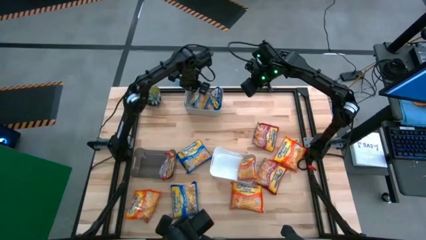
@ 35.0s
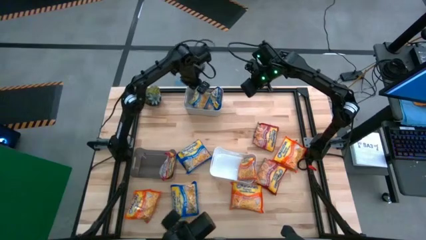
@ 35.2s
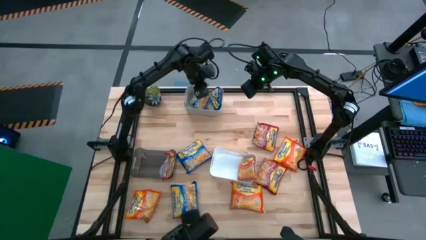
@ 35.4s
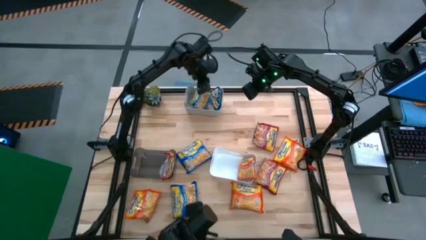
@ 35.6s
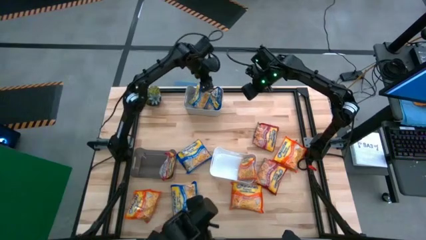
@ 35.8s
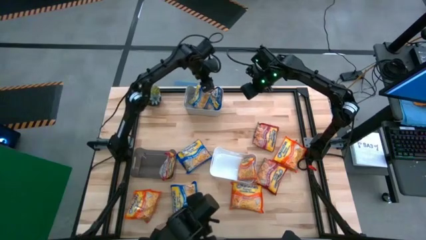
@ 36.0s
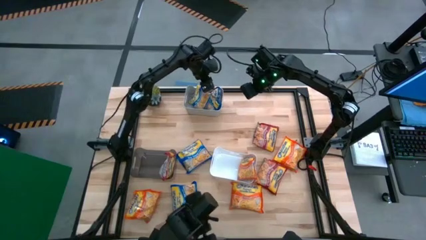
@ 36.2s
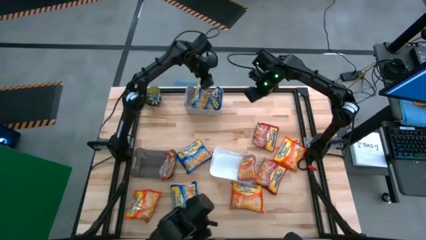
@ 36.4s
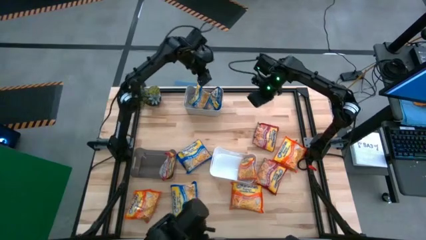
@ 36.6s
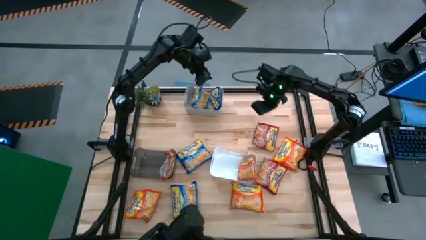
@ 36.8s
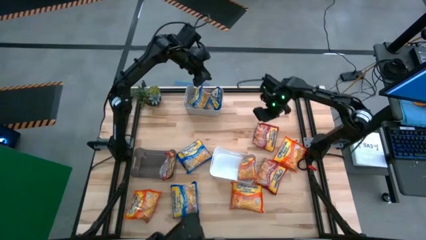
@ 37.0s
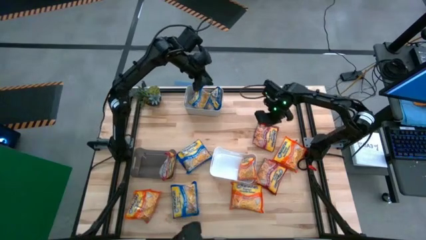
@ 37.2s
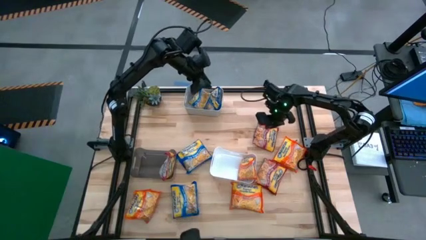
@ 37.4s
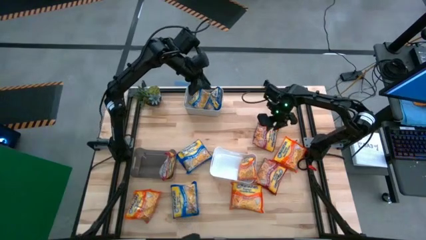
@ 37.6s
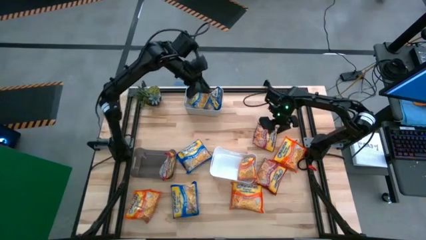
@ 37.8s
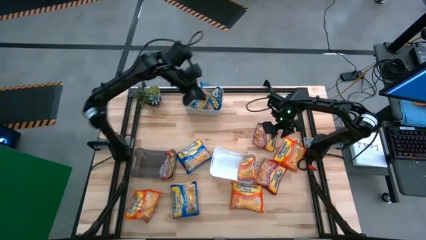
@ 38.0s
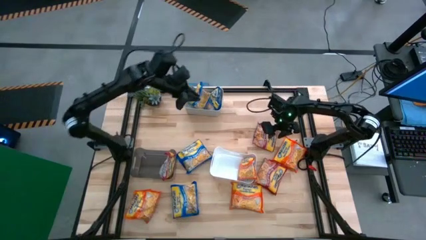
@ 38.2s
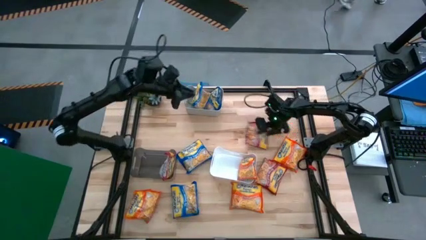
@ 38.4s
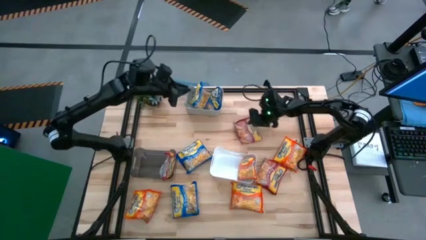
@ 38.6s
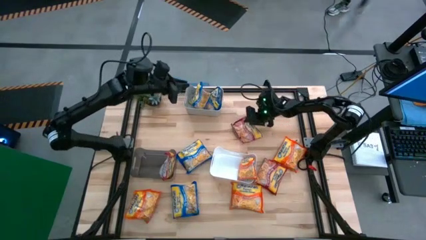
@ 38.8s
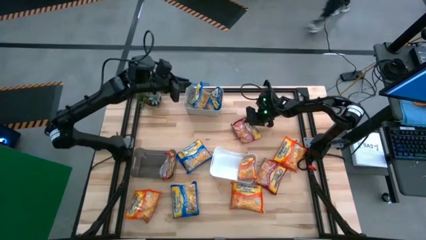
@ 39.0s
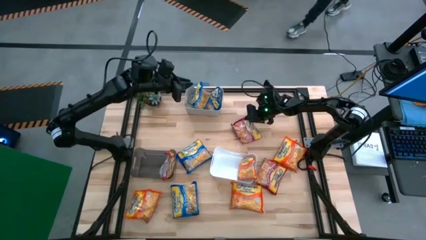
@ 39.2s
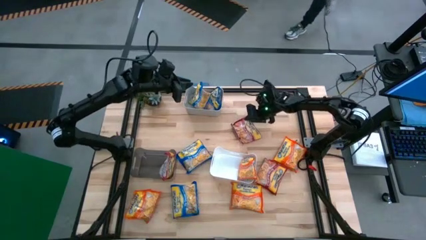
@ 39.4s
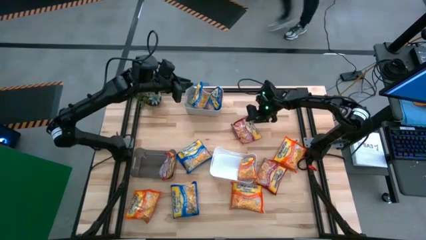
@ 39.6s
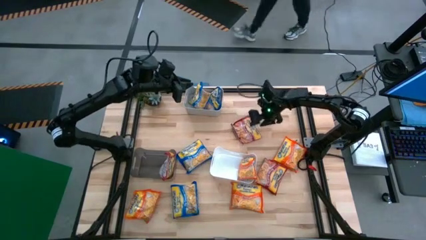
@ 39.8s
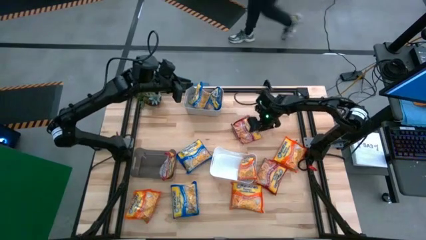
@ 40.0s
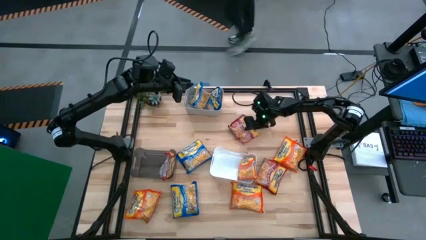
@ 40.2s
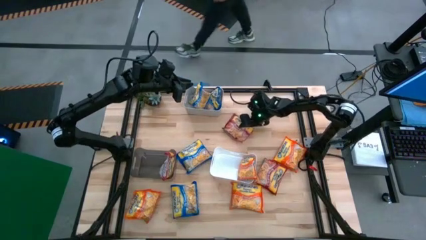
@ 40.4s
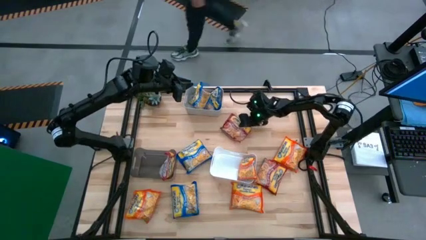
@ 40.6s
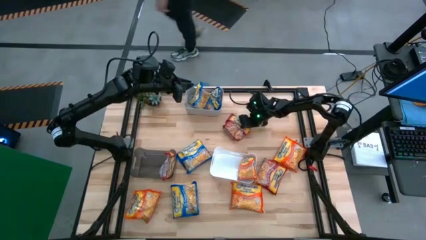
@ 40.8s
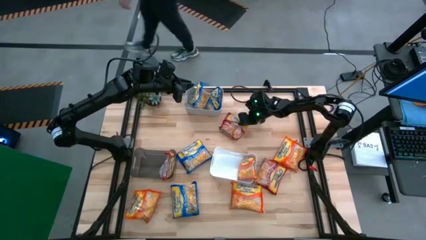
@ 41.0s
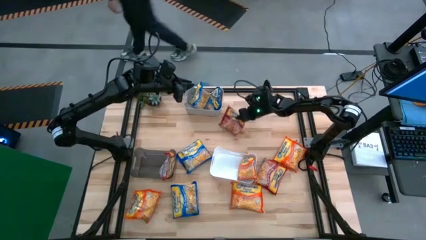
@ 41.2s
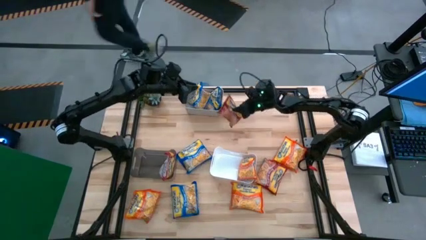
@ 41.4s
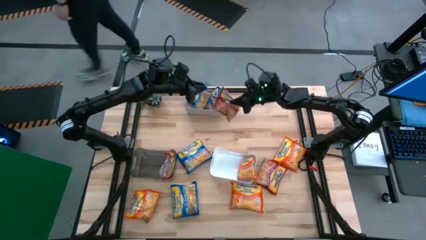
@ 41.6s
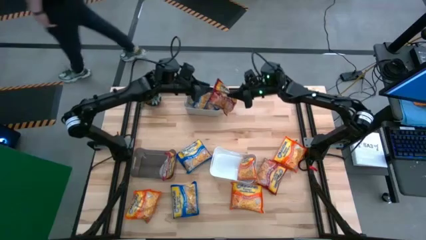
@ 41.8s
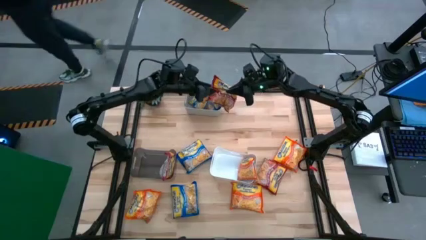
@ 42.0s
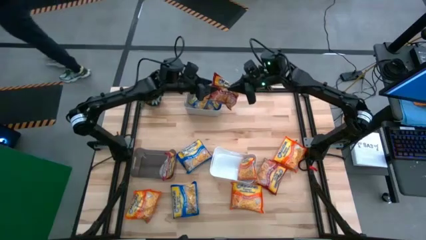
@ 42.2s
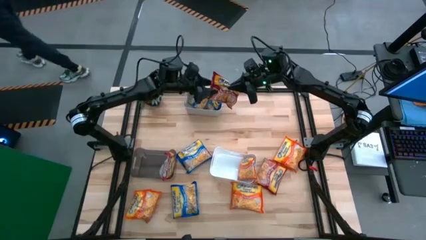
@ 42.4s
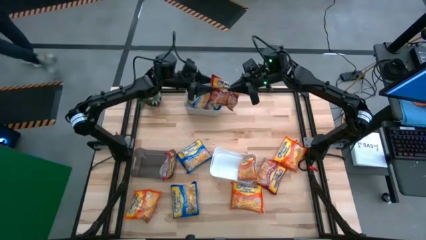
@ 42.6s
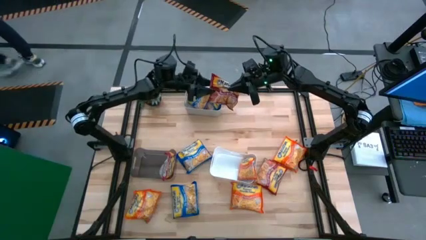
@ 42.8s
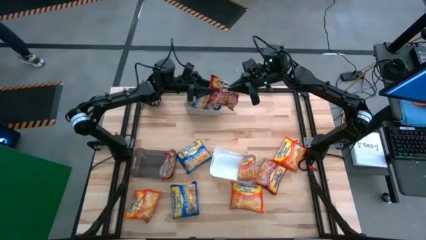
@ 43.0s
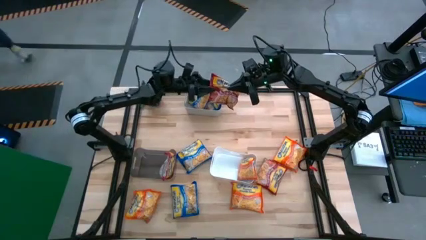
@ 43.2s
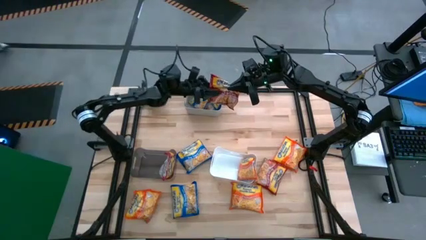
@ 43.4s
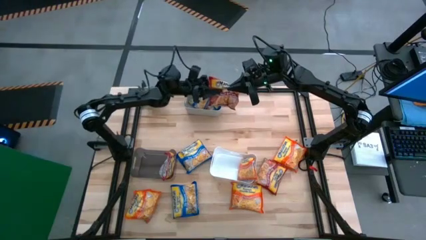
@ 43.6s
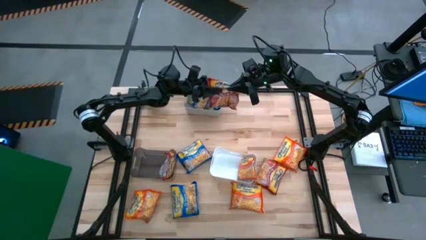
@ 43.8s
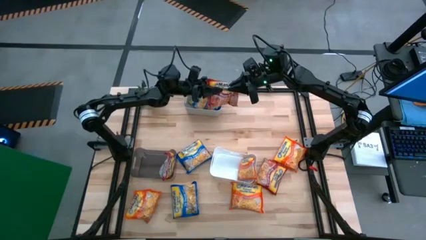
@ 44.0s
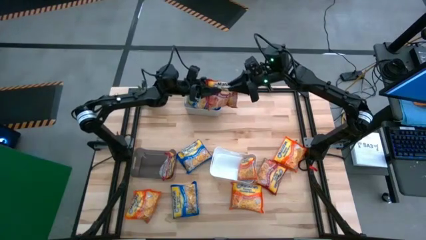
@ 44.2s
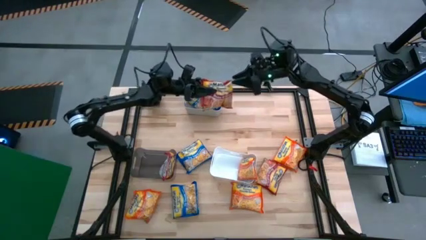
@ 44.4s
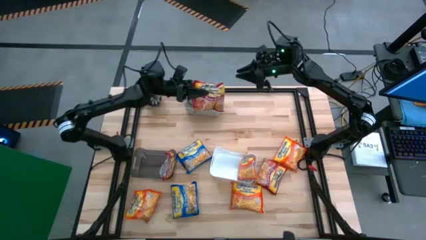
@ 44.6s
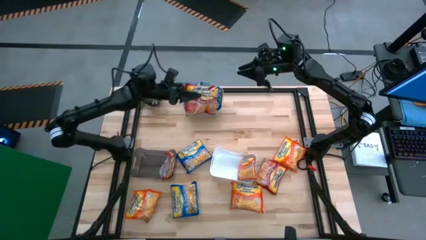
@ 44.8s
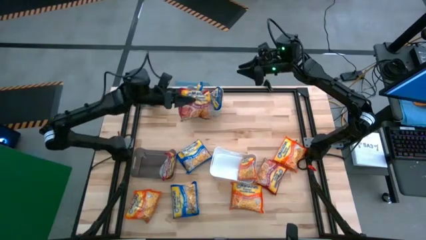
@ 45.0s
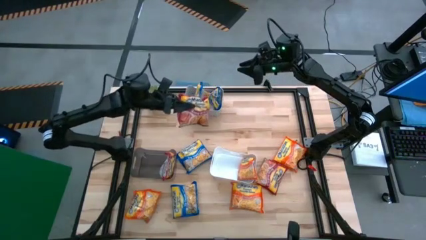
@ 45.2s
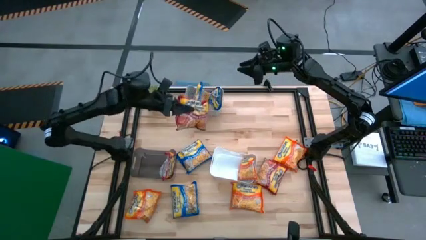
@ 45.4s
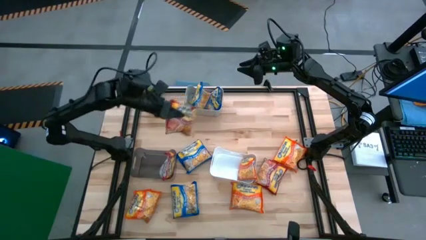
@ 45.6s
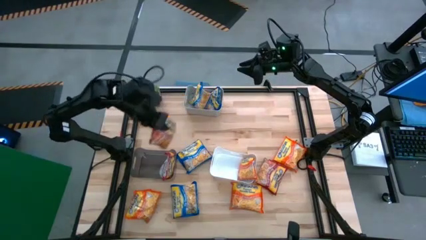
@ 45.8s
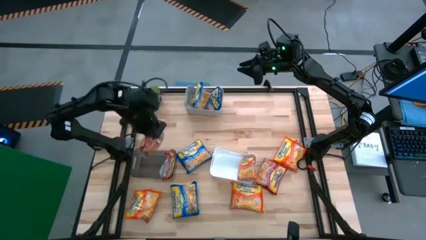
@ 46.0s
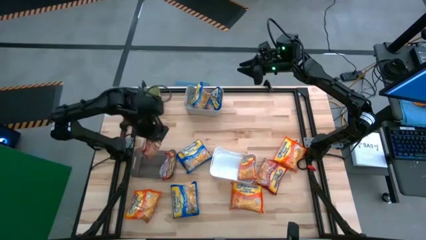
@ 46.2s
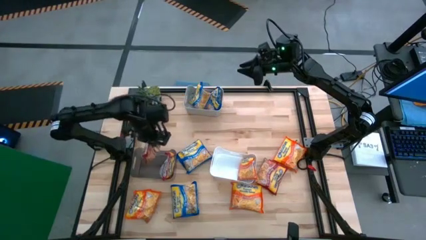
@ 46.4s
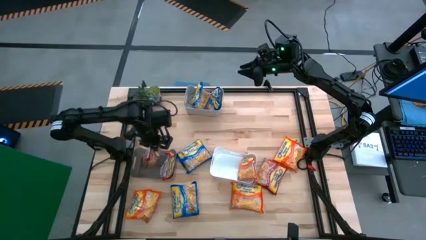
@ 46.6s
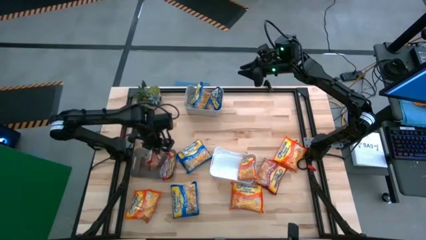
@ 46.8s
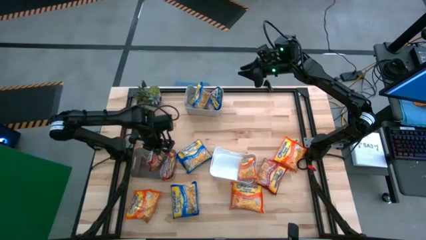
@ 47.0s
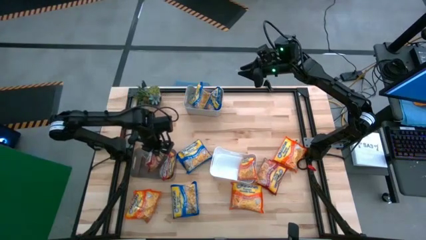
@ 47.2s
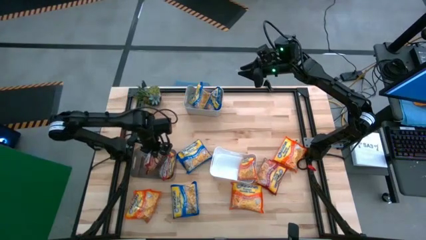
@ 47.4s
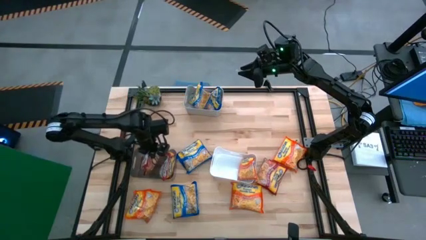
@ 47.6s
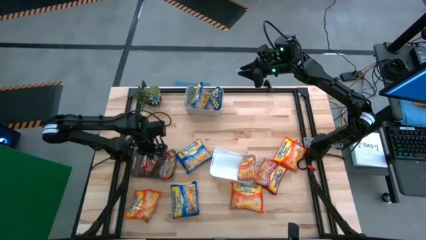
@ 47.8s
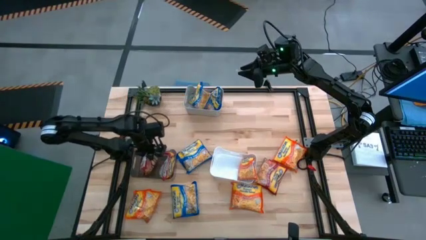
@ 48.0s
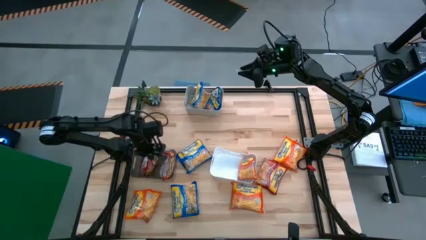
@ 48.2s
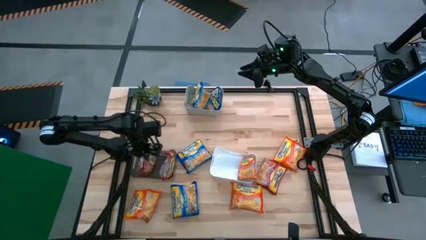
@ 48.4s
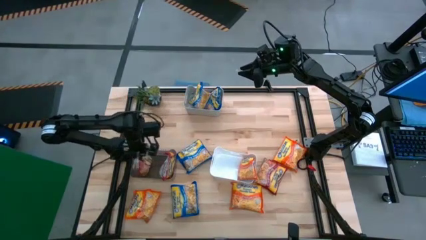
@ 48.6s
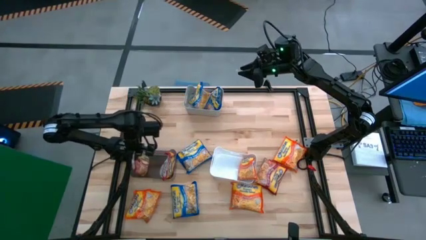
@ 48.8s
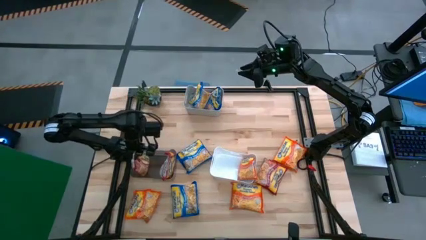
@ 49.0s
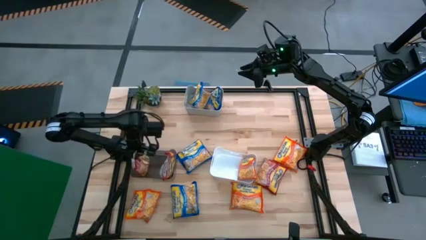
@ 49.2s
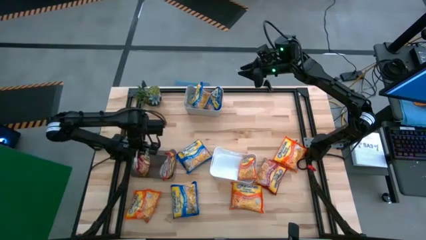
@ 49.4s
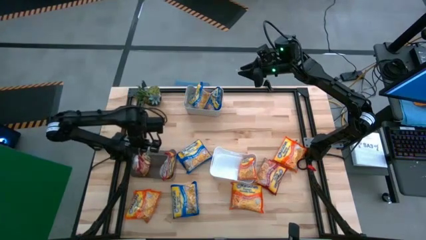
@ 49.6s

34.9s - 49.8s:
Task: Sort Maruchan noodles
Put the red noodle pack into the black bin
